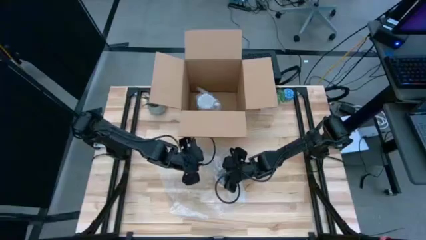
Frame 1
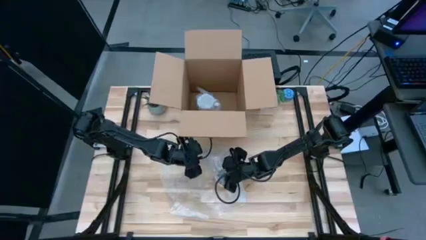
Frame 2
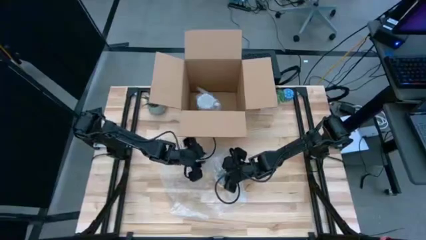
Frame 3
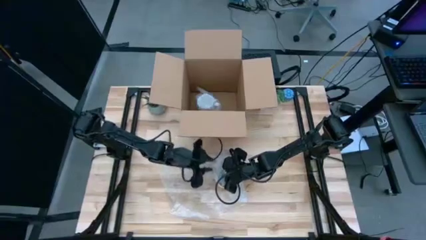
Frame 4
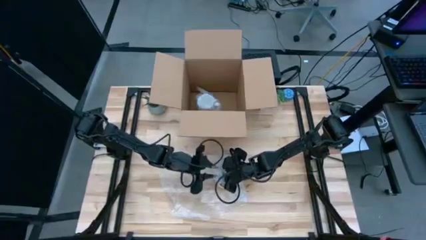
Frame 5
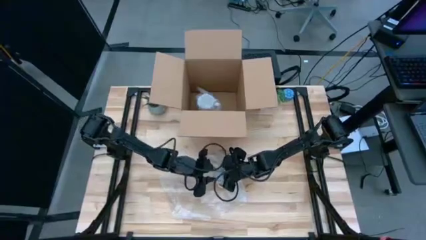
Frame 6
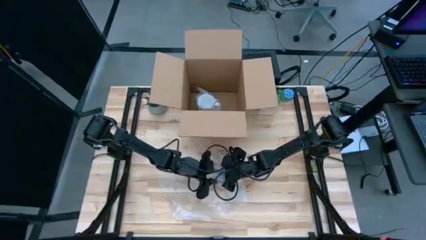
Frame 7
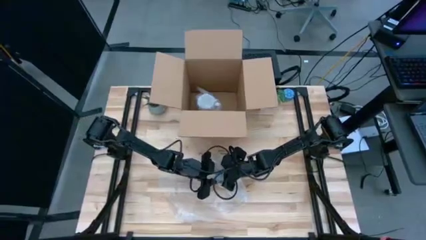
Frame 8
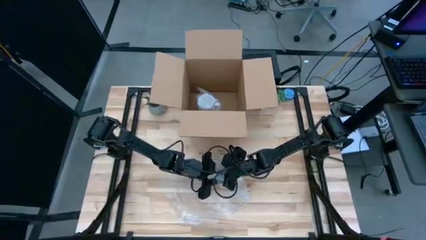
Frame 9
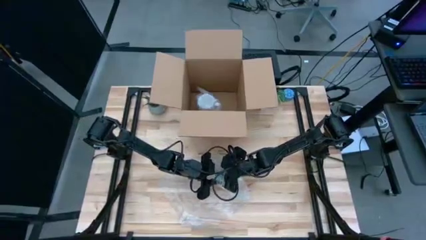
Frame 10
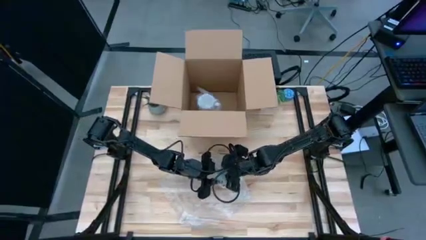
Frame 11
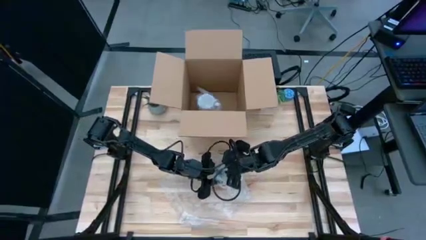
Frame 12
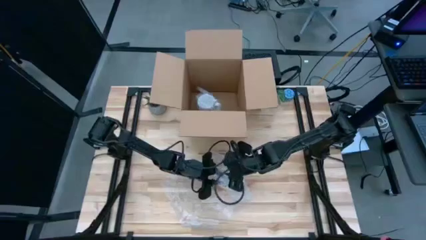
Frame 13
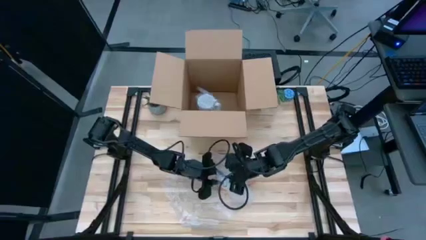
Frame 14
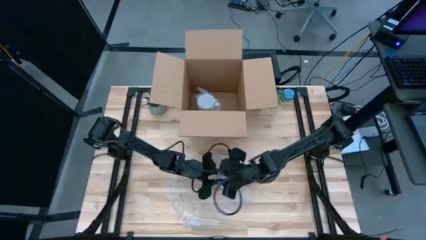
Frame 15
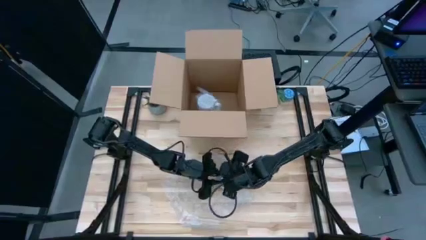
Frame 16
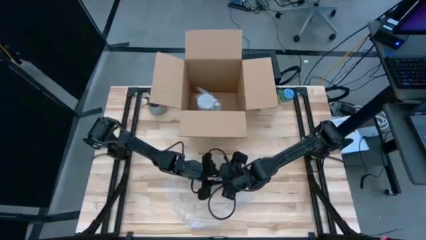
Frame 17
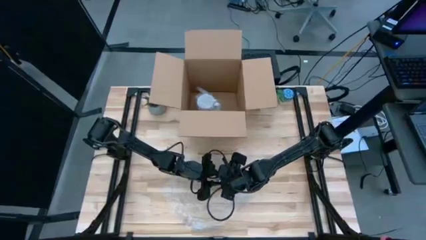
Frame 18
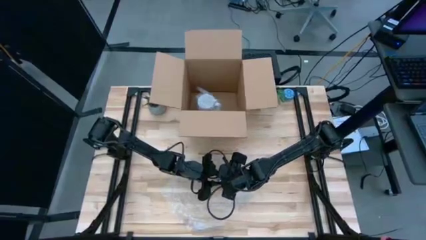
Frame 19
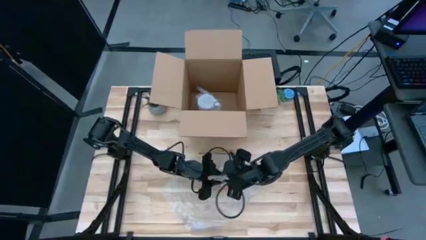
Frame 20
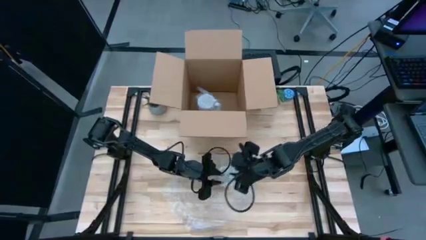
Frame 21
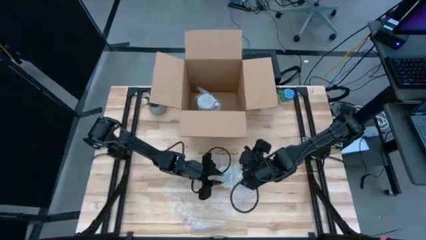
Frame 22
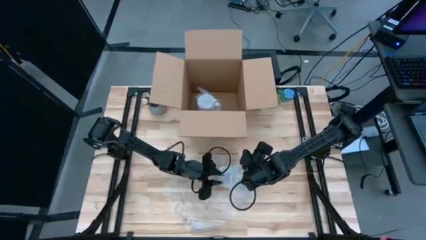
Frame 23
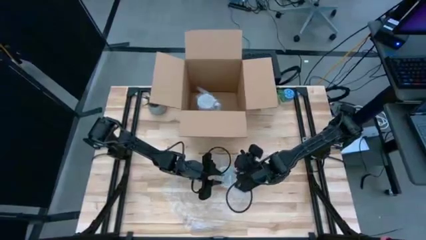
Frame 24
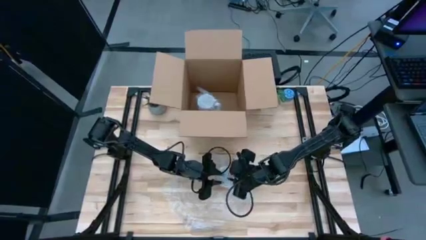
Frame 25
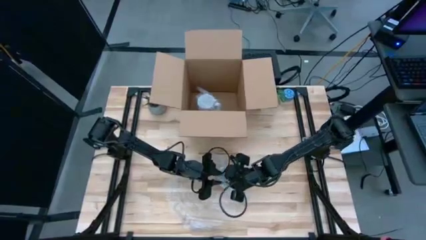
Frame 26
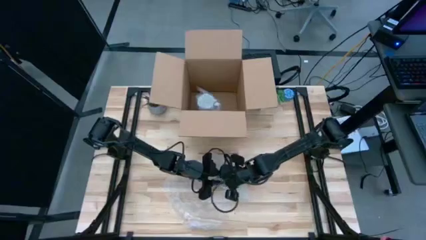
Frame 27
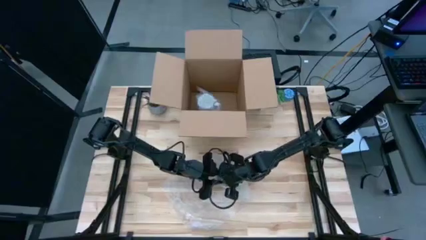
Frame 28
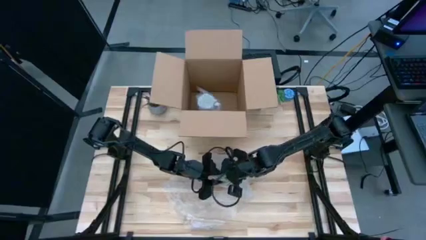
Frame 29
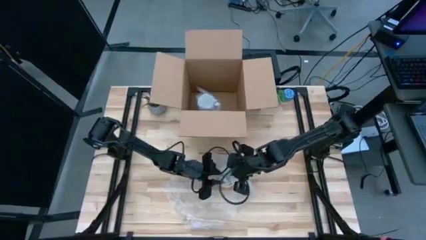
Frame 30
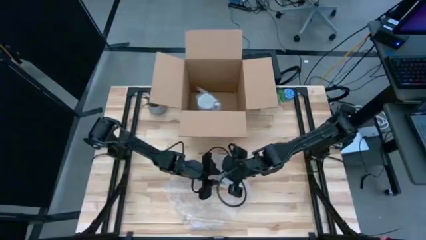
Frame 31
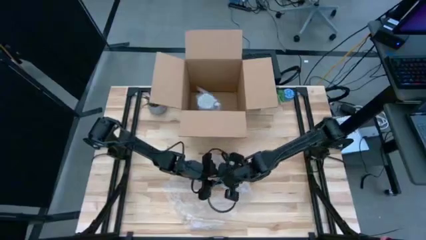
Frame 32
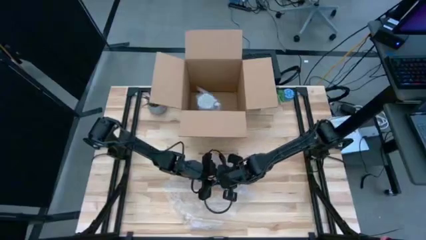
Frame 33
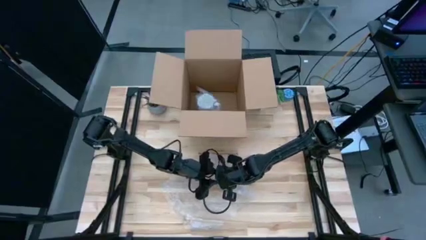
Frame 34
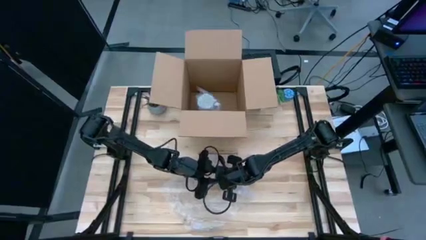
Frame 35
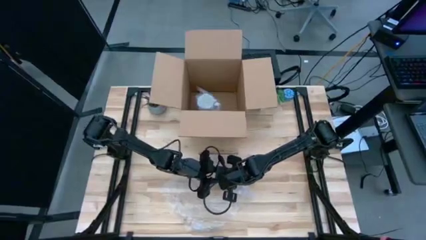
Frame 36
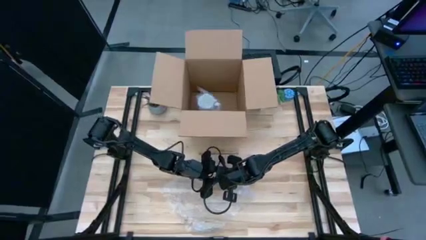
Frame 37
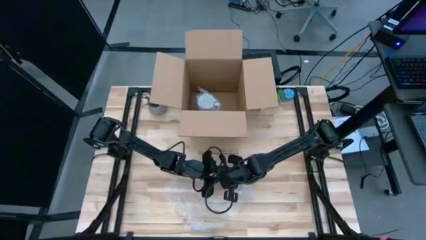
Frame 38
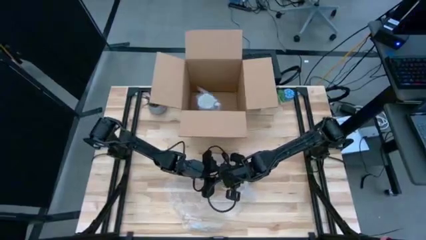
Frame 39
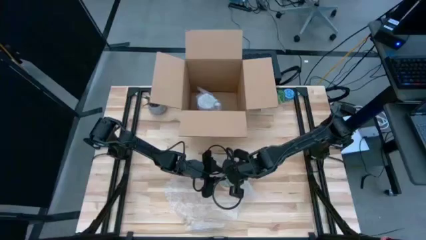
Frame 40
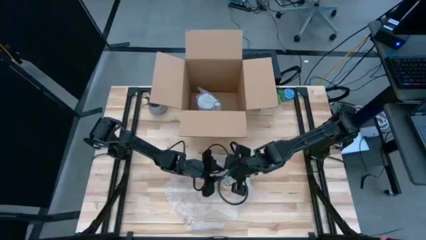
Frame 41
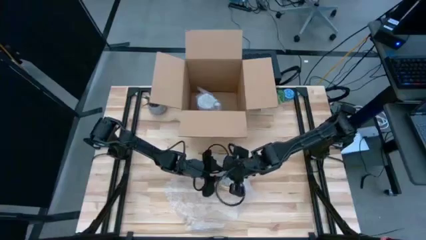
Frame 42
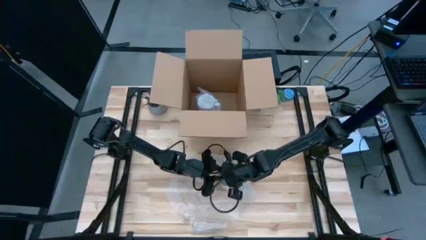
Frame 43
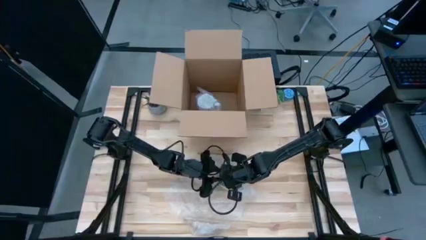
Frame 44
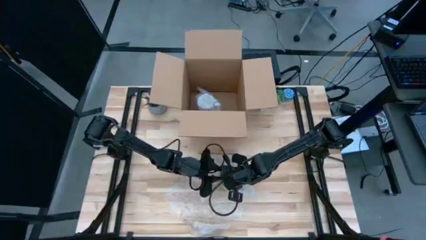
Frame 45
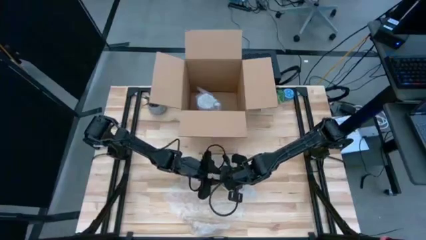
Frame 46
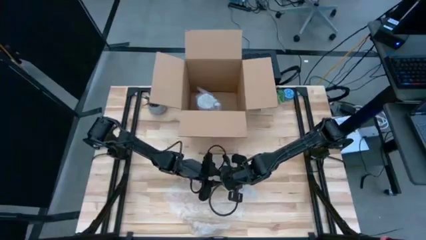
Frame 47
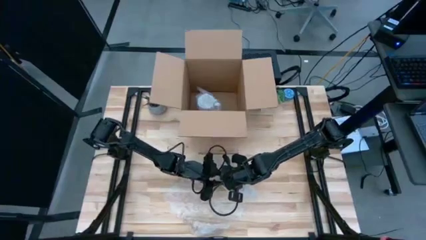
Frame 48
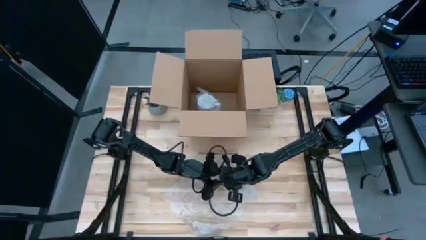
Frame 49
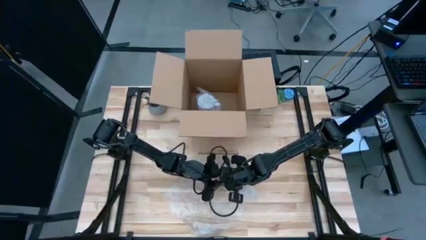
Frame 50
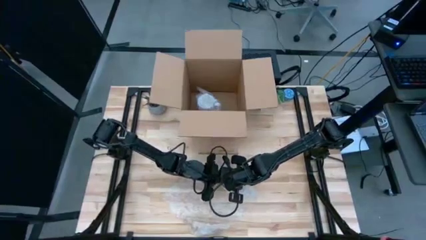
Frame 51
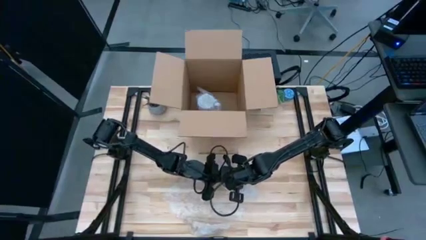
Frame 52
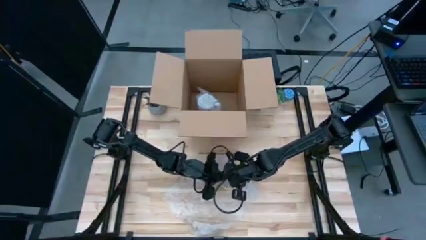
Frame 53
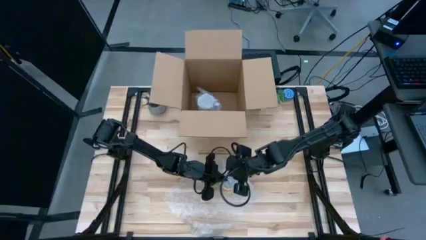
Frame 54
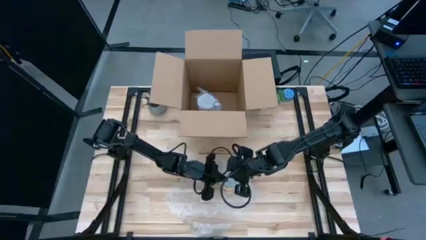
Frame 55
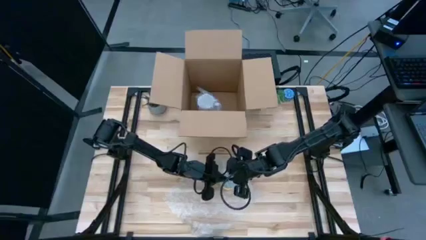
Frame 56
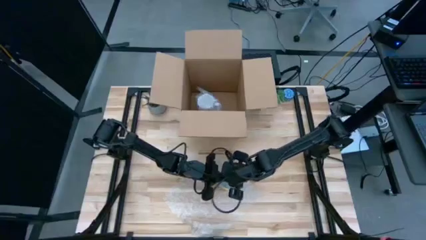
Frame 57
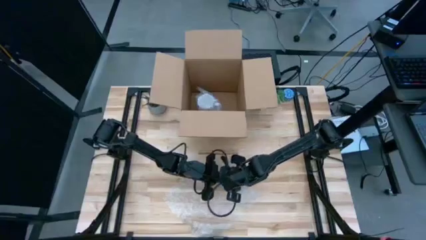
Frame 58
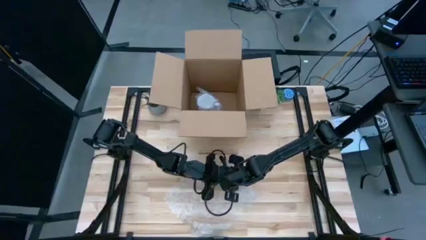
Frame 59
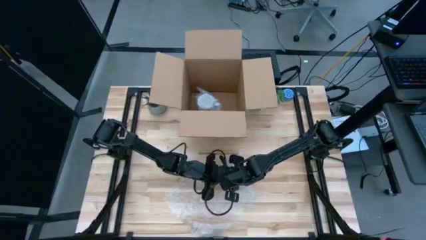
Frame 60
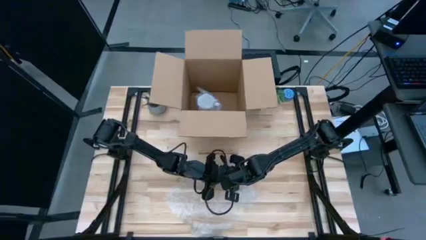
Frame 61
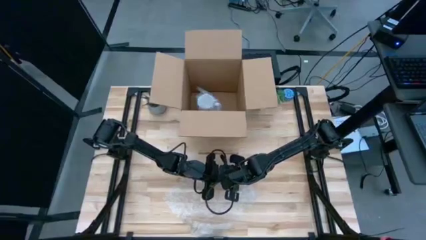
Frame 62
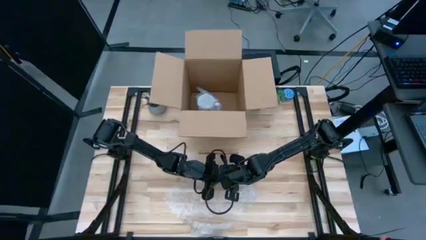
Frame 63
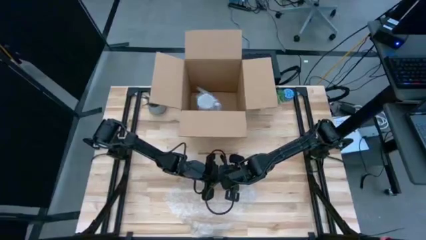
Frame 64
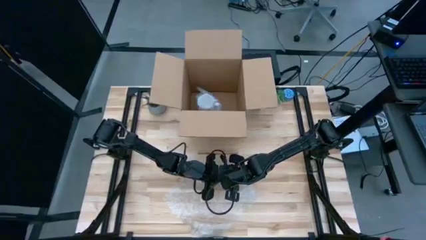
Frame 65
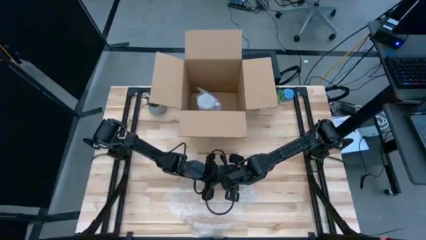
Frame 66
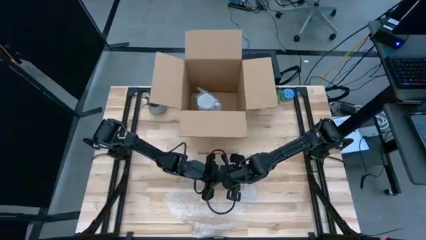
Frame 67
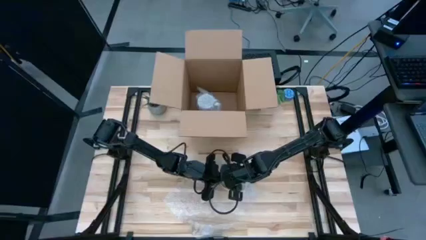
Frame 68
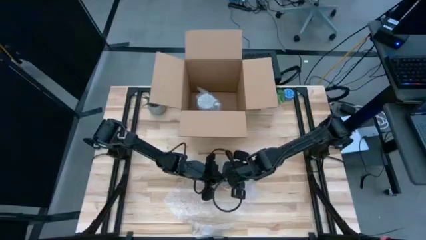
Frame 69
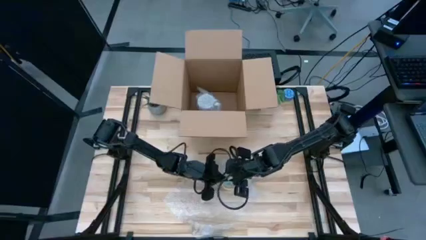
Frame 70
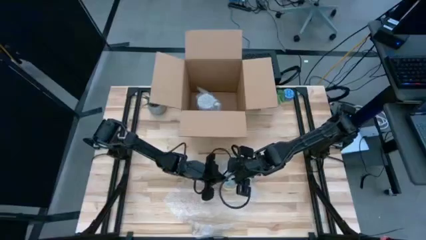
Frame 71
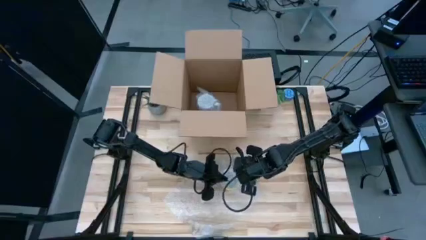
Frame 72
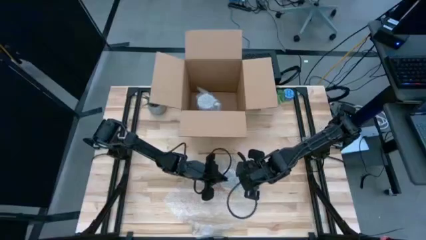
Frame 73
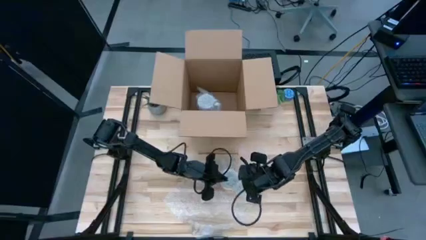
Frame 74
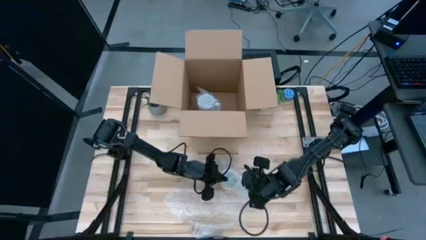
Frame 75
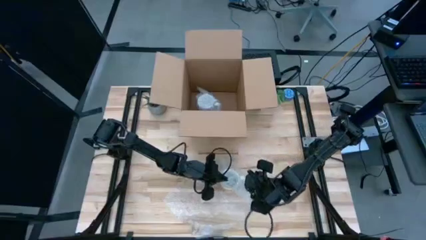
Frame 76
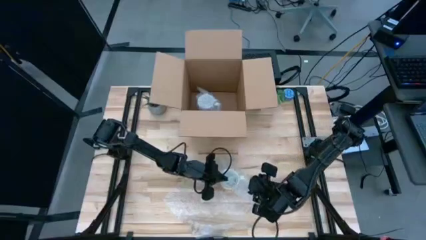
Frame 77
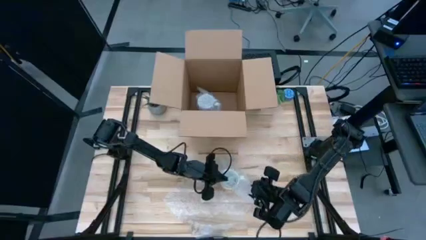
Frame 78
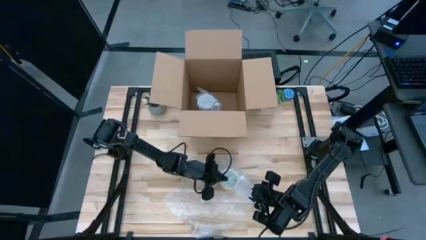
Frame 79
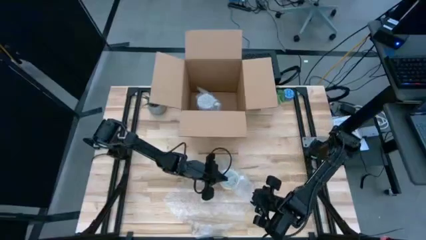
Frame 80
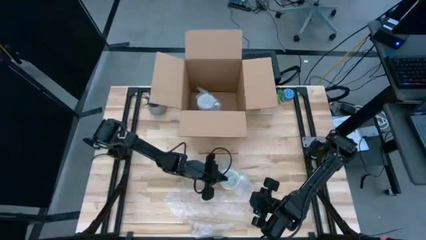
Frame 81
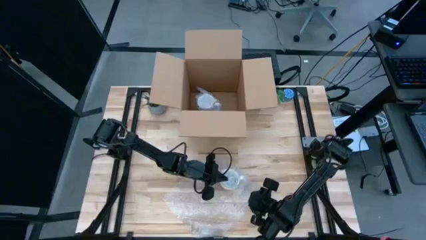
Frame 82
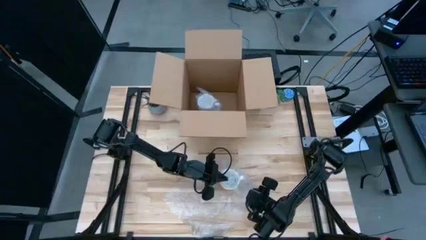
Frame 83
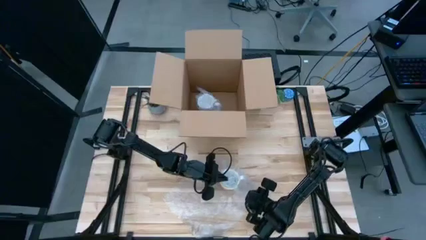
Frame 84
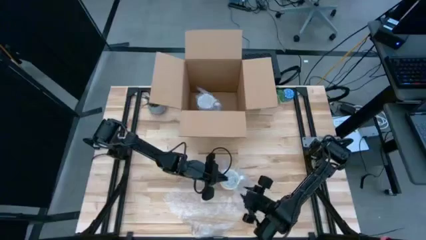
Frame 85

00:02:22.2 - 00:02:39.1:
Task: wrap mug
Wrap the orange mug with bubble wrap
